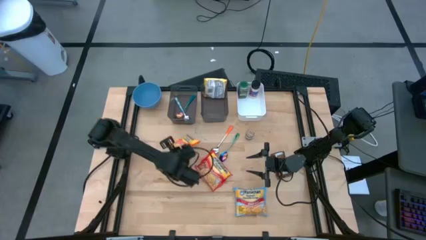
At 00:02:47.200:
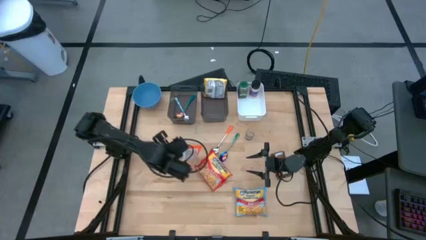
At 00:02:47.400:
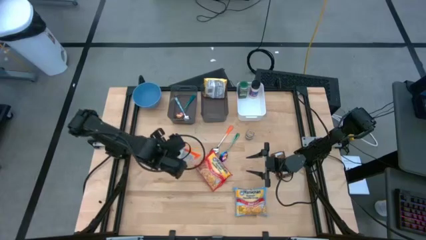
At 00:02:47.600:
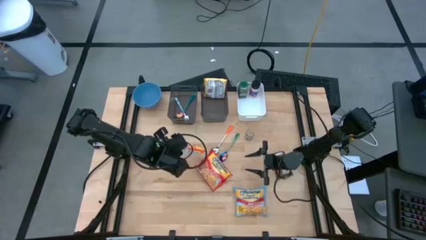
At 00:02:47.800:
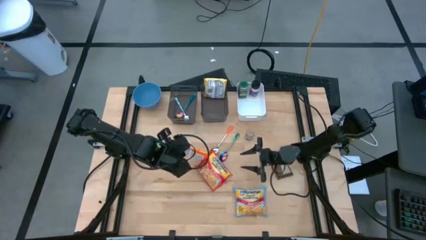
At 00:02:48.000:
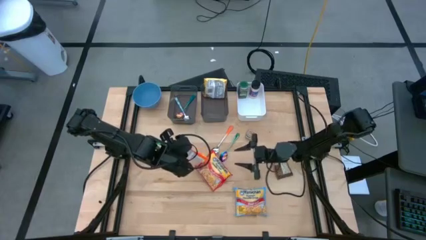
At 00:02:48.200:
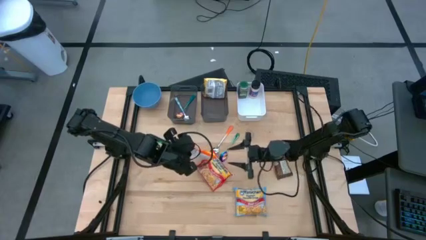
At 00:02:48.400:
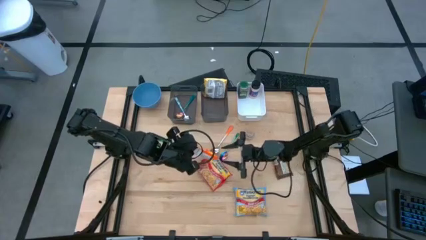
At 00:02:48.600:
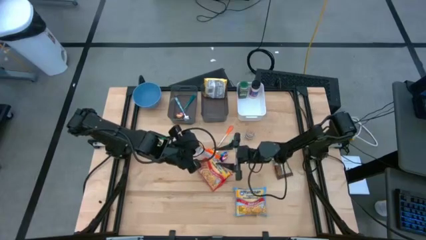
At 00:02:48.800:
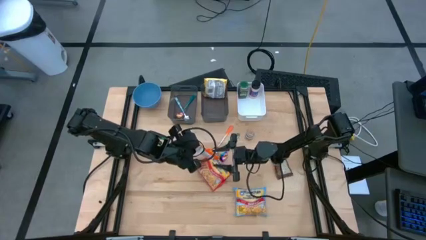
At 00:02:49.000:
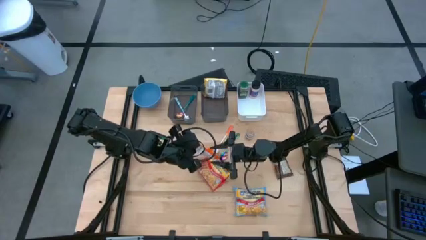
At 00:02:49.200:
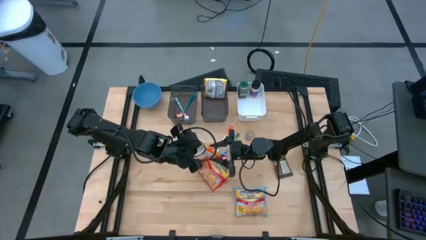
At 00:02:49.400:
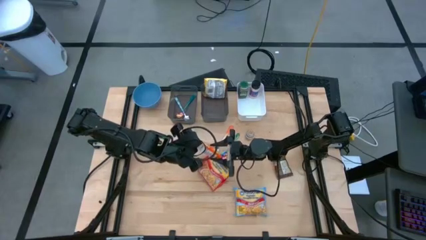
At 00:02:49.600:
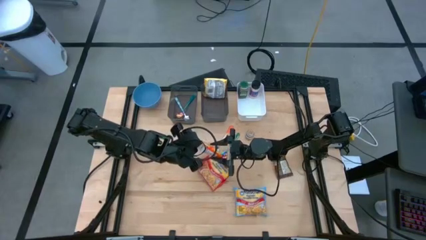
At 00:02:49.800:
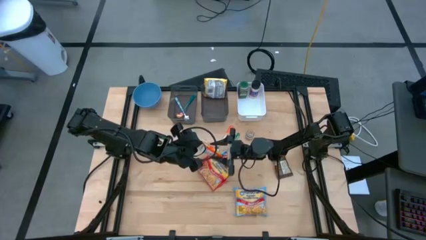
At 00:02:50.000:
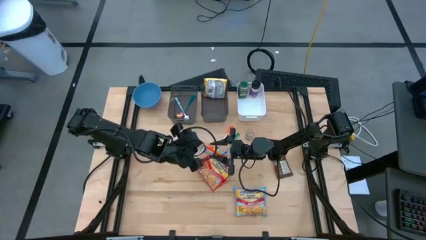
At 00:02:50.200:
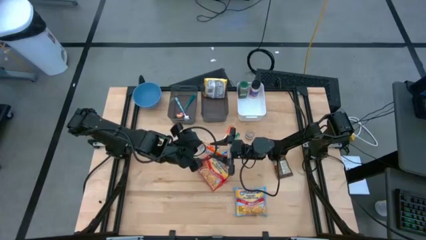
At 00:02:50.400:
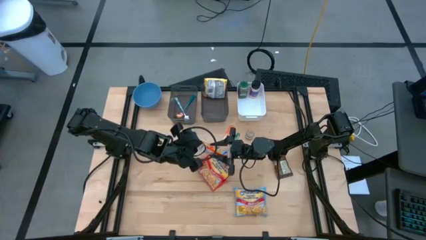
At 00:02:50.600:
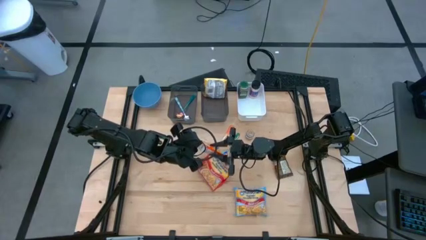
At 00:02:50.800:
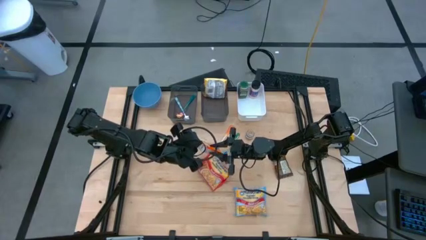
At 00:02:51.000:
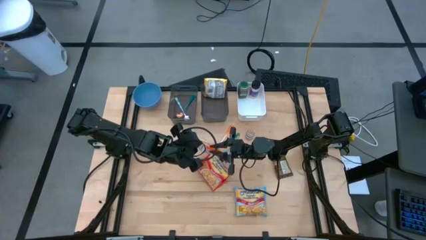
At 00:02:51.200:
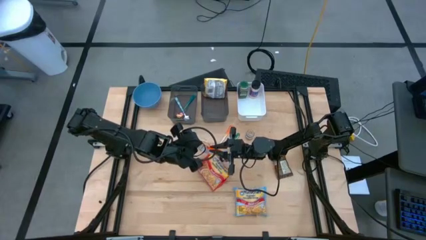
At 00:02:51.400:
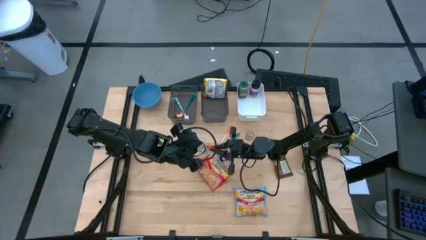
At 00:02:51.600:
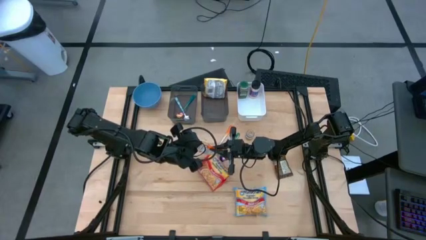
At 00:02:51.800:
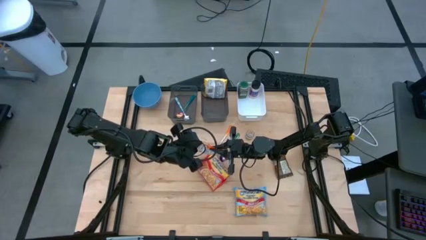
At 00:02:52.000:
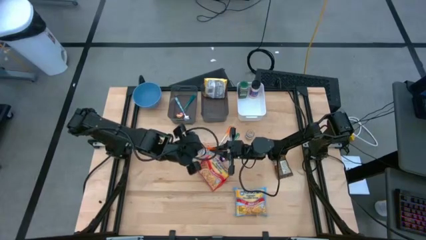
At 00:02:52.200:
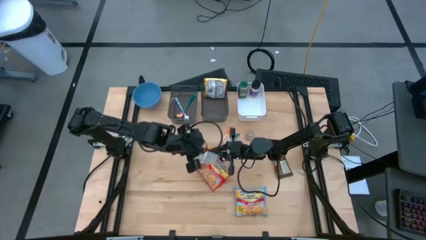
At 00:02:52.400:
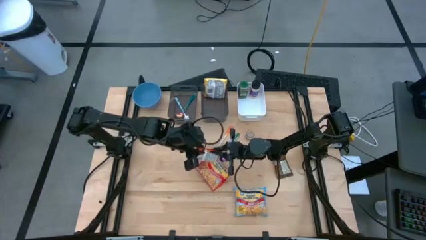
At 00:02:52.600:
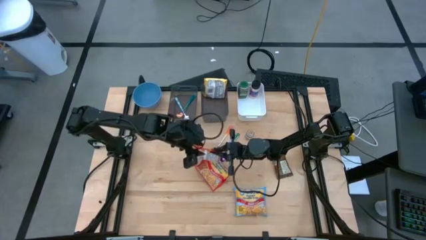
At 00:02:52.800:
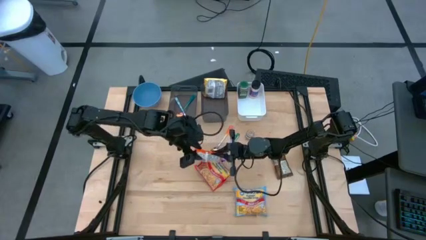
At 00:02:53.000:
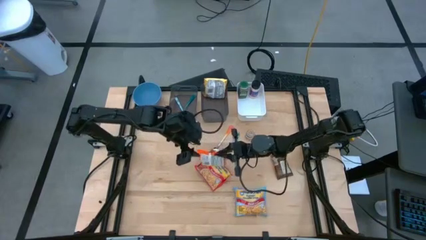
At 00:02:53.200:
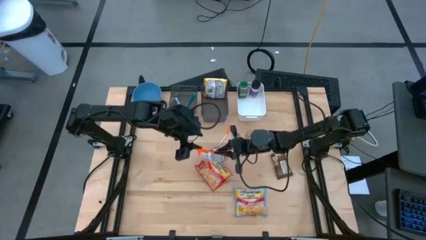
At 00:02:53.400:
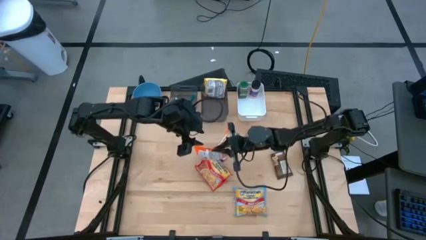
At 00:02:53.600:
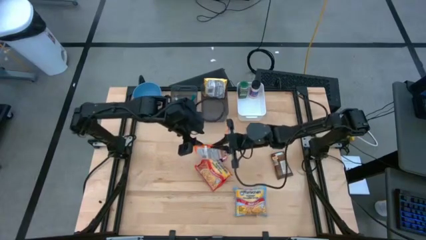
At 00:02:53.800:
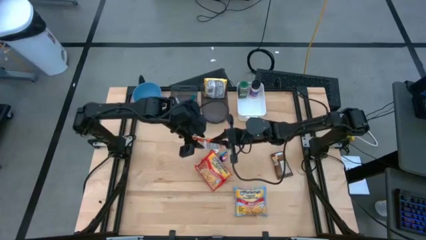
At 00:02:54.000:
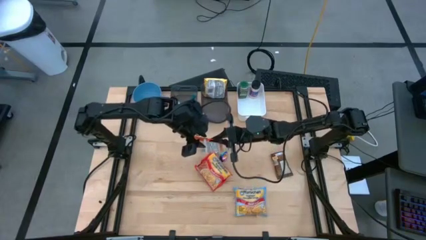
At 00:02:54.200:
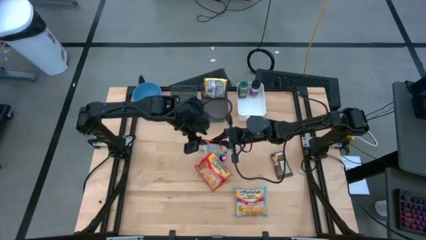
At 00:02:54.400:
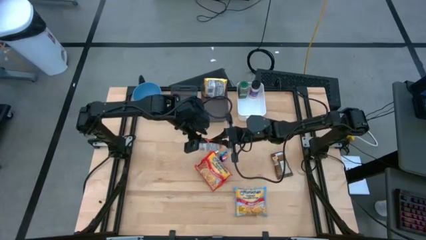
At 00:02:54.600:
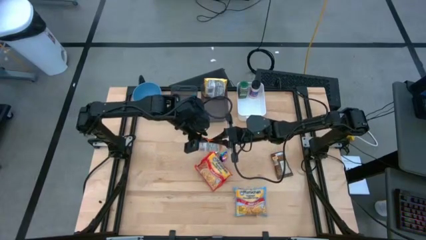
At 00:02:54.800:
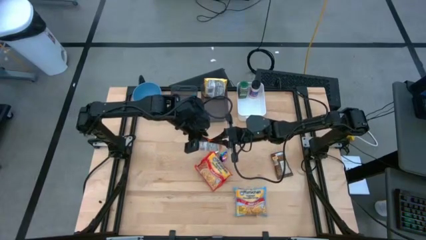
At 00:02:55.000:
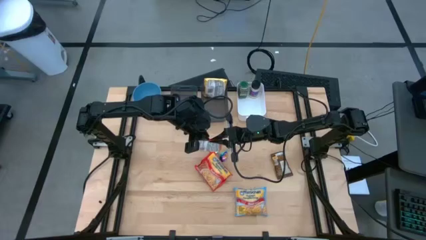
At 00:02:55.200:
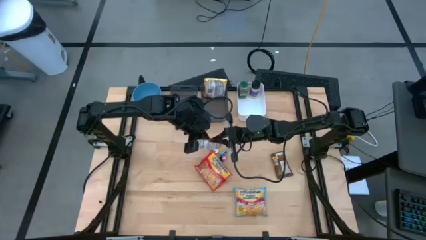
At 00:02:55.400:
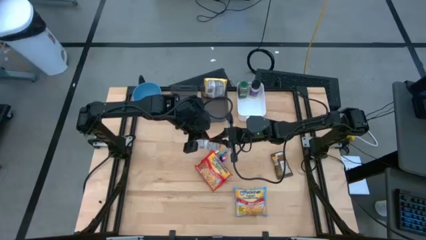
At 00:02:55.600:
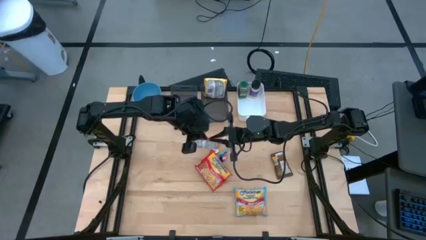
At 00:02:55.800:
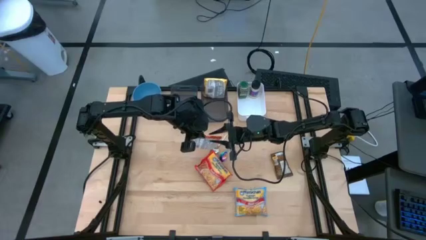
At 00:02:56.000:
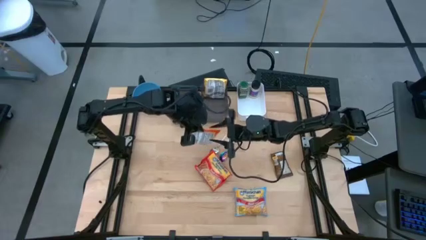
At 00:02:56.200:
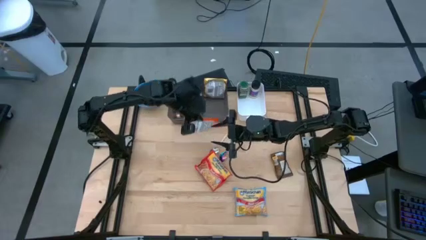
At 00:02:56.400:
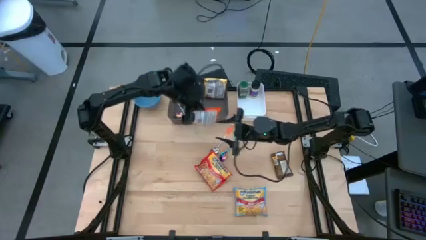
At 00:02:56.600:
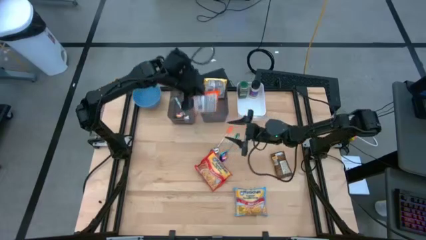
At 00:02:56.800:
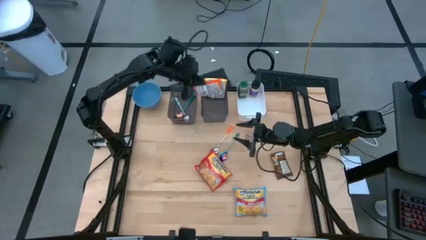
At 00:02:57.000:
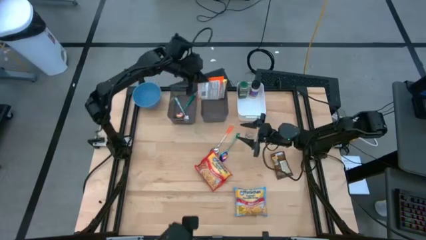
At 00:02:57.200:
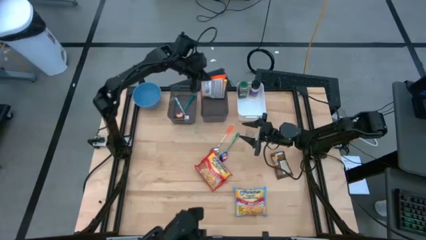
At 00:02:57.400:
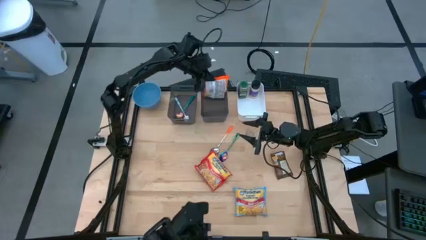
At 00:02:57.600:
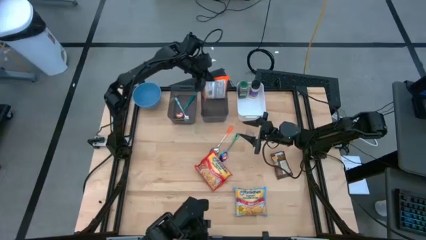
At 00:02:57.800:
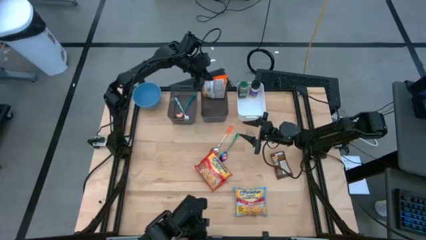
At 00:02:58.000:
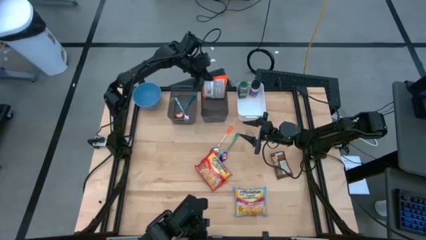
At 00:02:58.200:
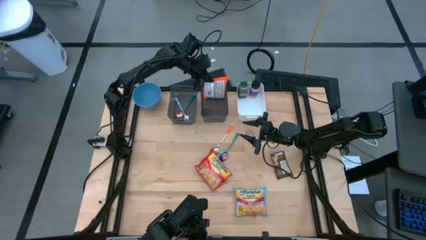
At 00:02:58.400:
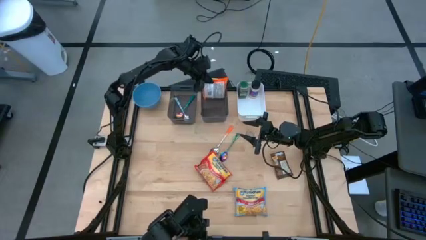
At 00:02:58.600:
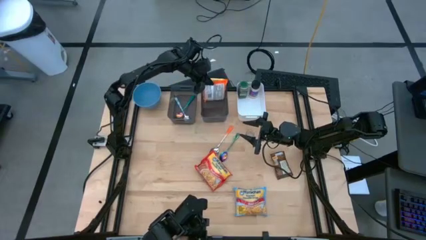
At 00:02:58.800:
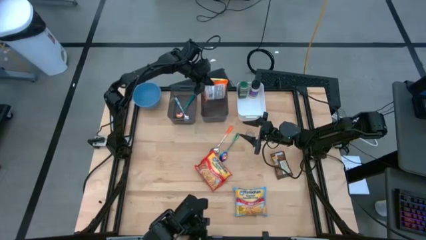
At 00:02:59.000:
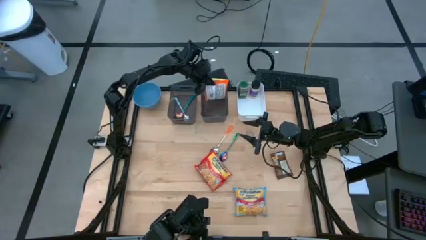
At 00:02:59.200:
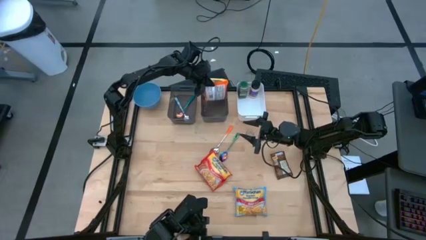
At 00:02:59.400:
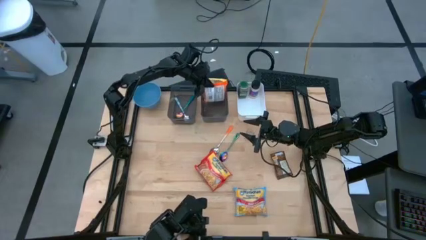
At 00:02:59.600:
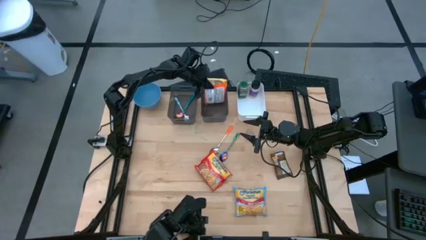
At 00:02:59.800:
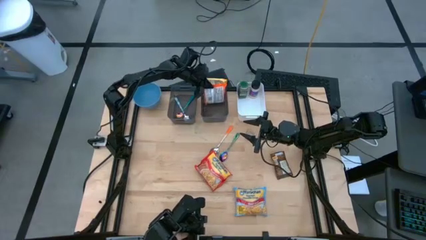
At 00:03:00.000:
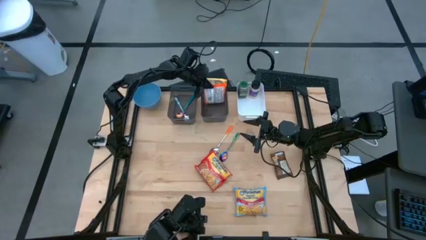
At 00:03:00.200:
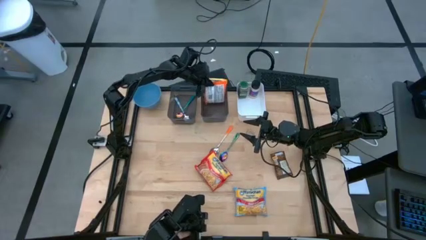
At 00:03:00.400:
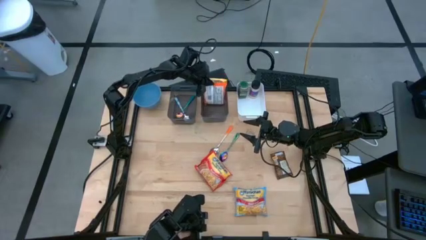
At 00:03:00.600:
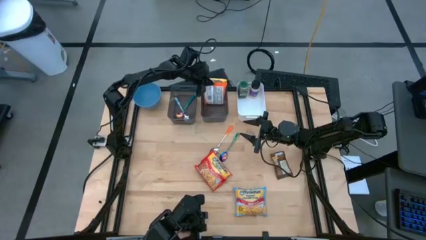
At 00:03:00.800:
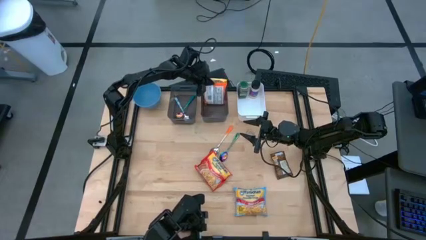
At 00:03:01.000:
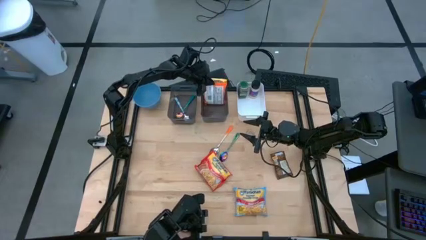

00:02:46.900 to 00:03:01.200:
Task: Pick & Place Food Item
Put the orange noodle pack into the right black bin

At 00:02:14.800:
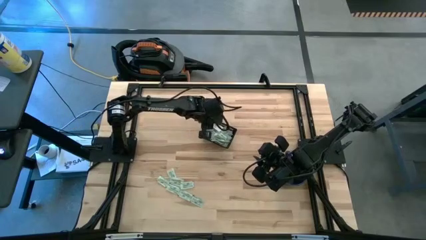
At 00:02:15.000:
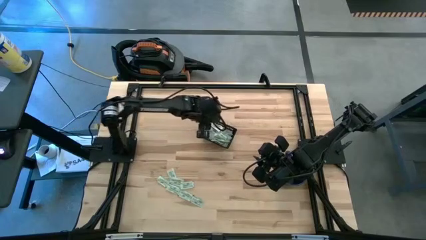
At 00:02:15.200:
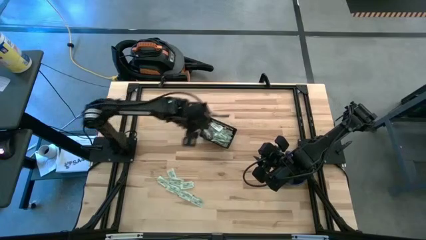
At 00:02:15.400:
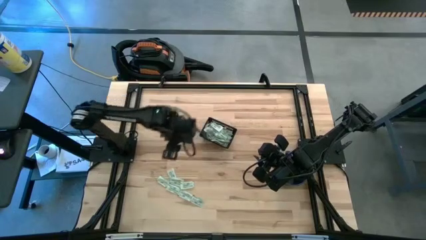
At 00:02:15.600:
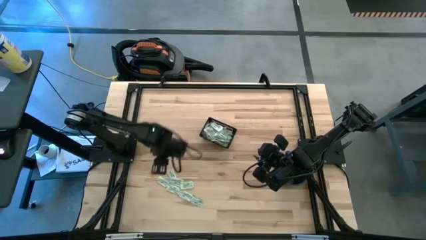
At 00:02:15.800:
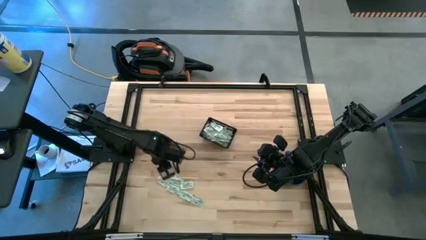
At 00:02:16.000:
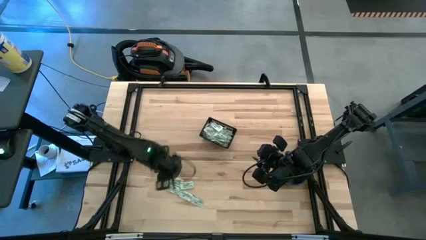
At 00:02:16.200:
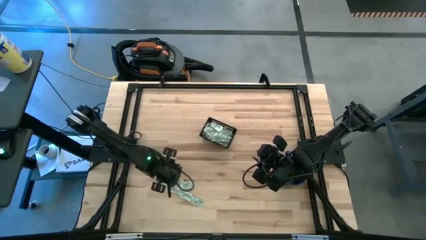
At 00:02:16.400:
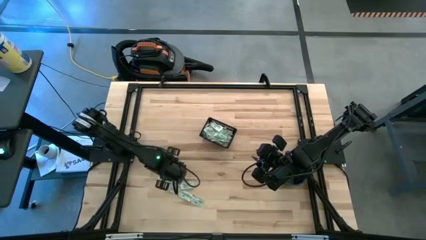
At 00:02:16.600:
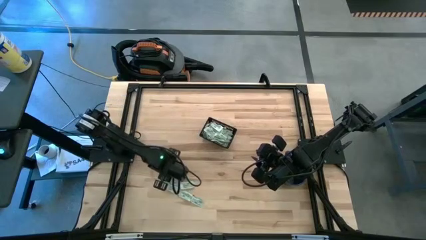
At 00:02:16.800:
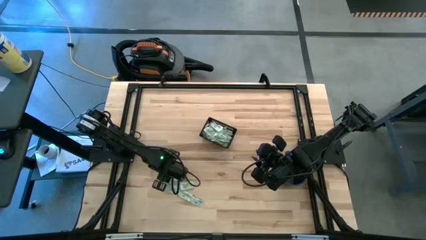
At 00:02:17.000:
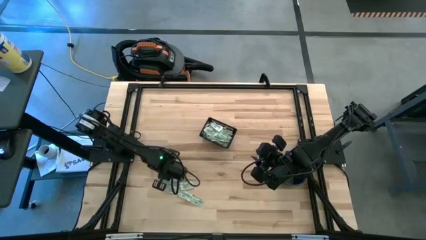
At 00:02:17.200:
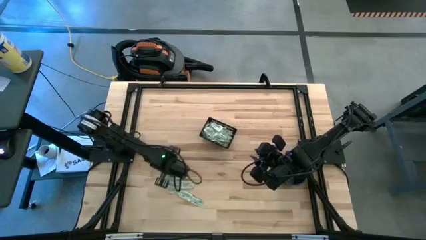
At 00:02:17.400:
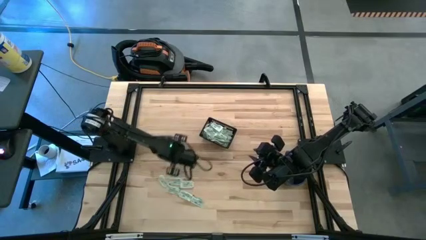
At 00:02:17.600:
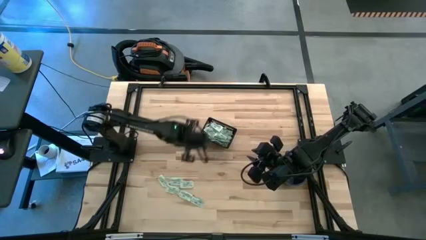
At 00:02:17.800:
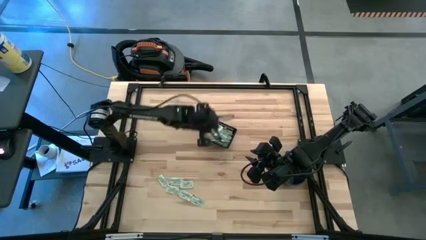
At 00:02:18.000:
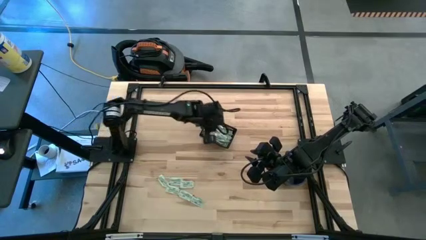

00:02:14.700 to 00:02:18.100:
Task: Pick and place Stevia / Truvia into bins
Put the stevia packet into the black bin
